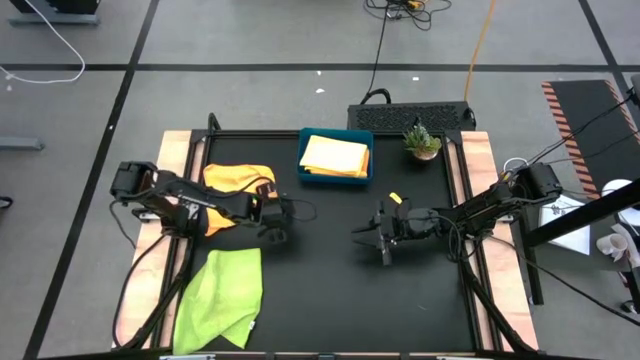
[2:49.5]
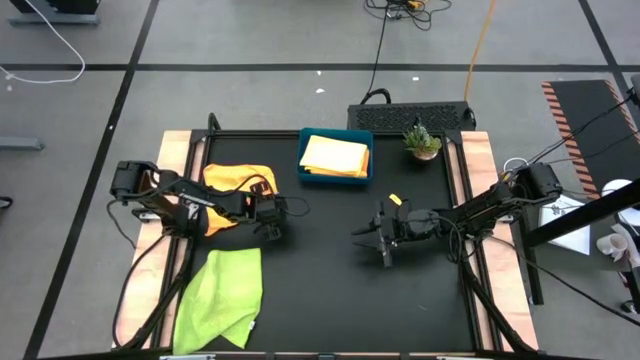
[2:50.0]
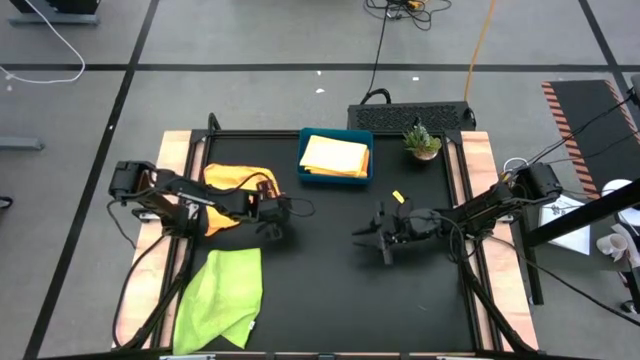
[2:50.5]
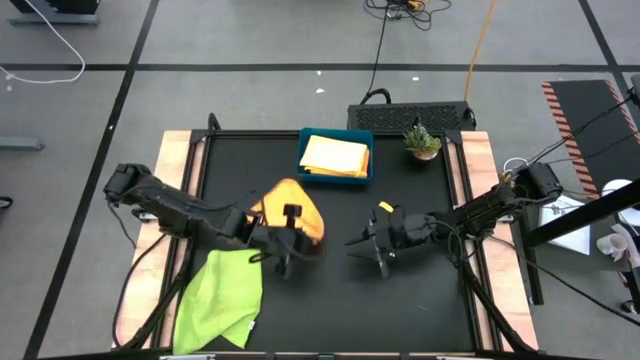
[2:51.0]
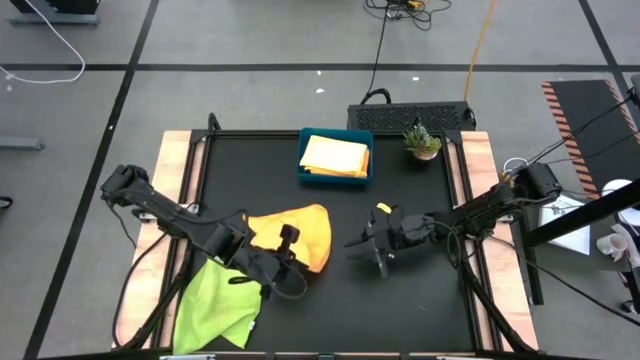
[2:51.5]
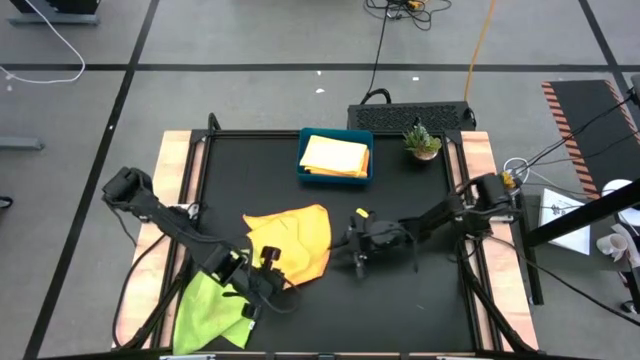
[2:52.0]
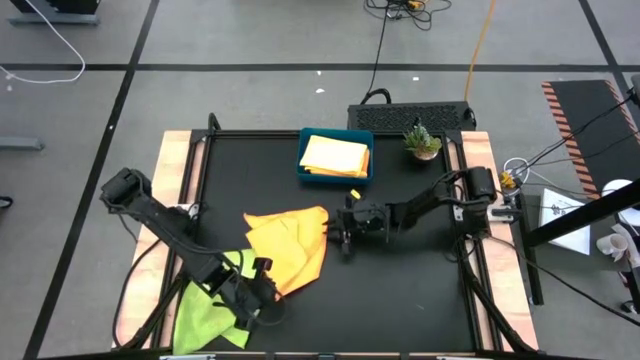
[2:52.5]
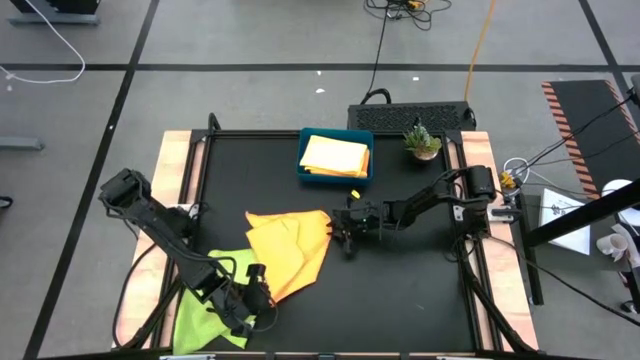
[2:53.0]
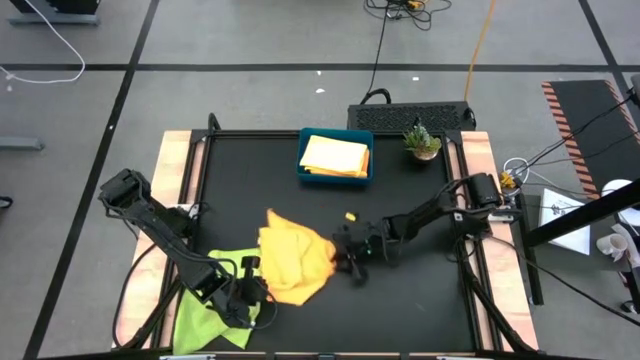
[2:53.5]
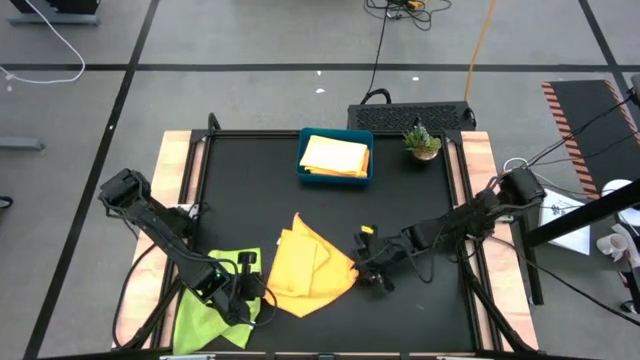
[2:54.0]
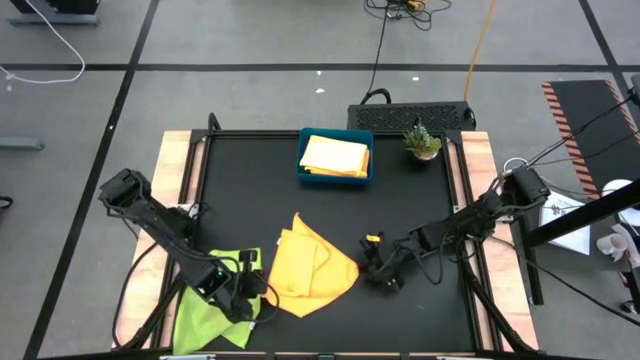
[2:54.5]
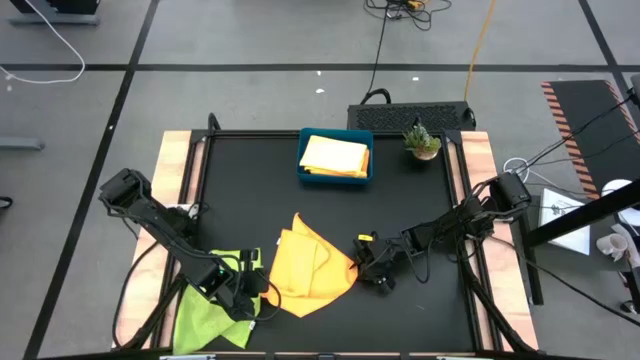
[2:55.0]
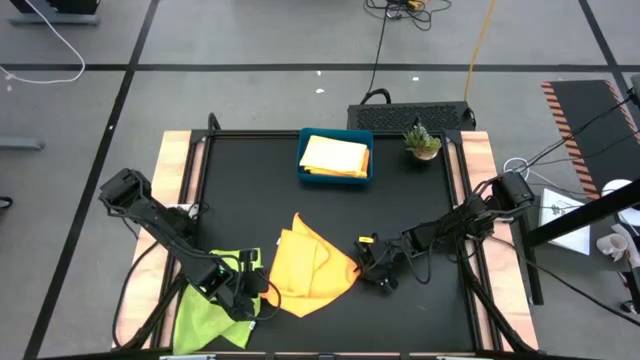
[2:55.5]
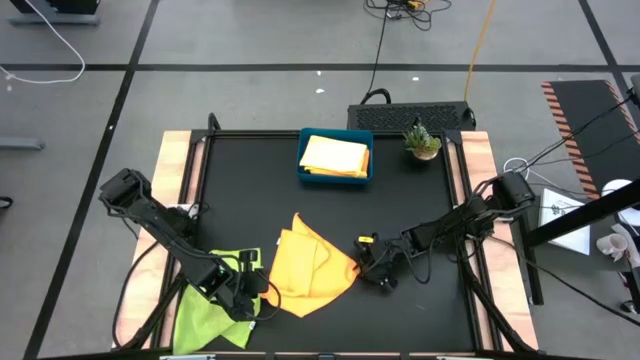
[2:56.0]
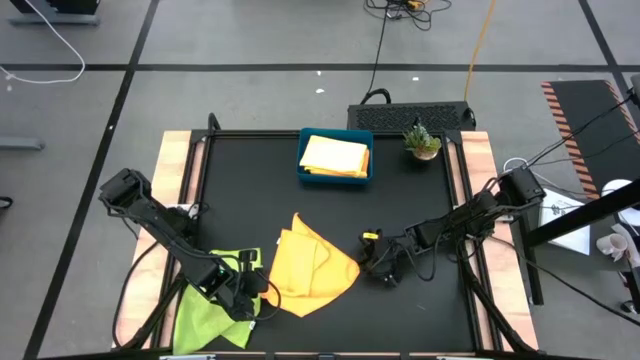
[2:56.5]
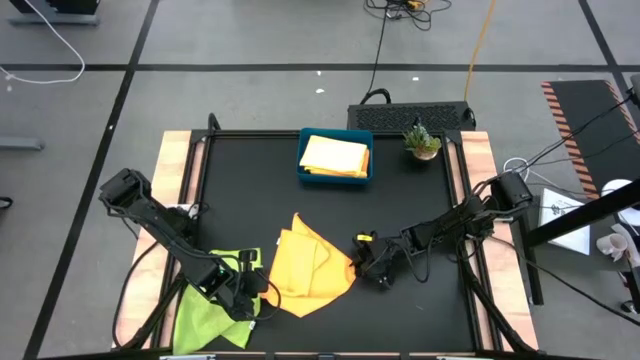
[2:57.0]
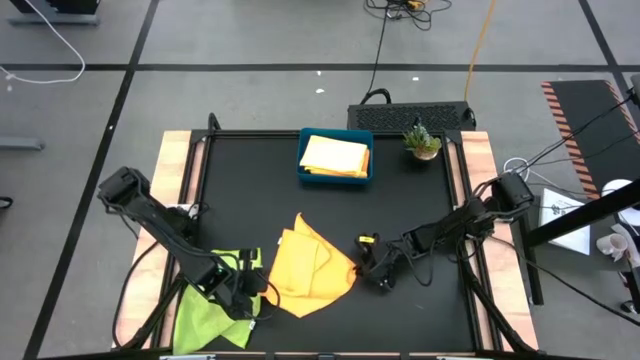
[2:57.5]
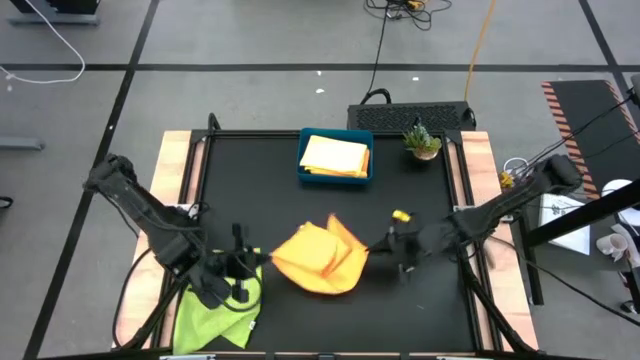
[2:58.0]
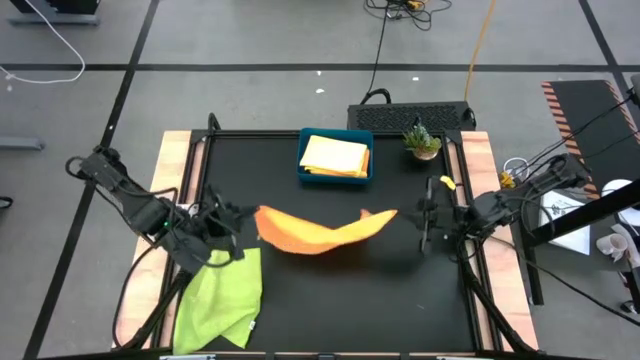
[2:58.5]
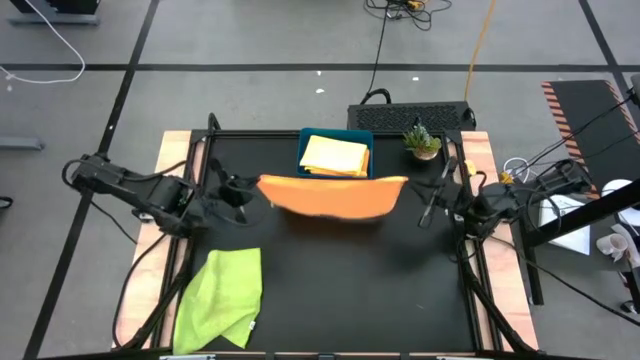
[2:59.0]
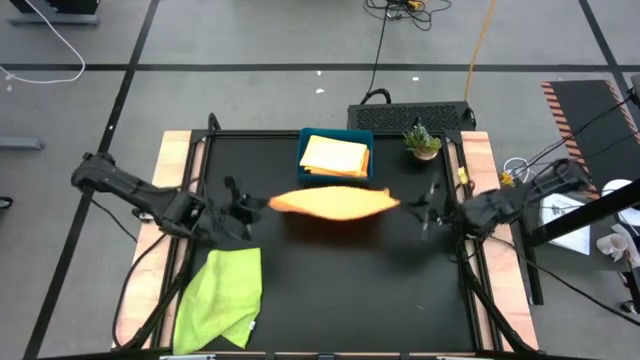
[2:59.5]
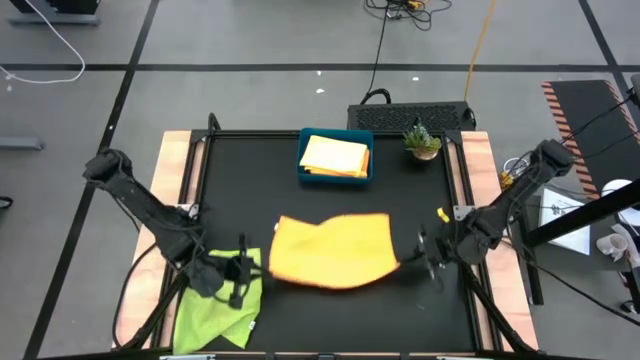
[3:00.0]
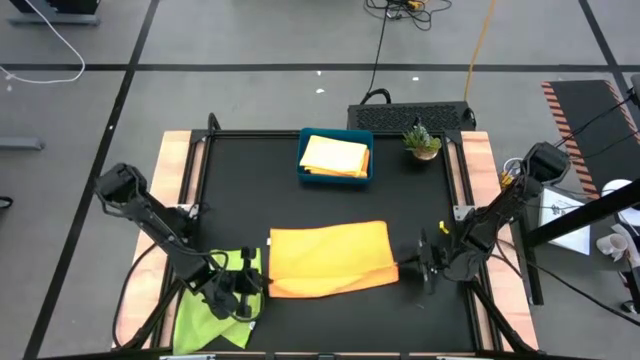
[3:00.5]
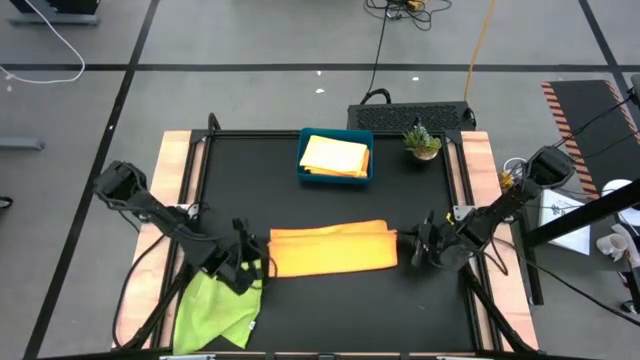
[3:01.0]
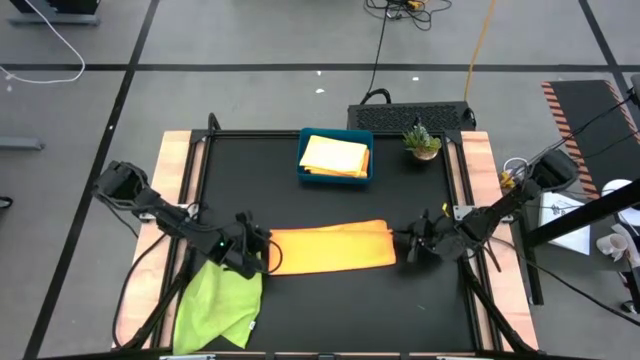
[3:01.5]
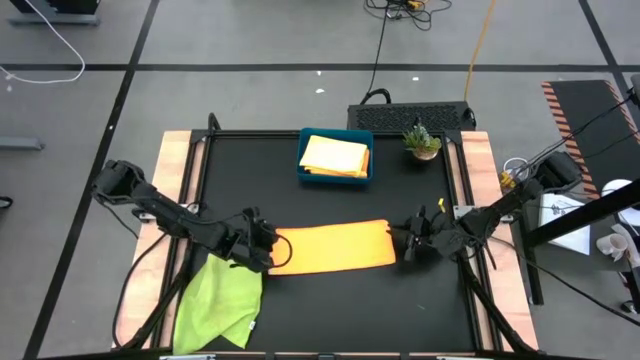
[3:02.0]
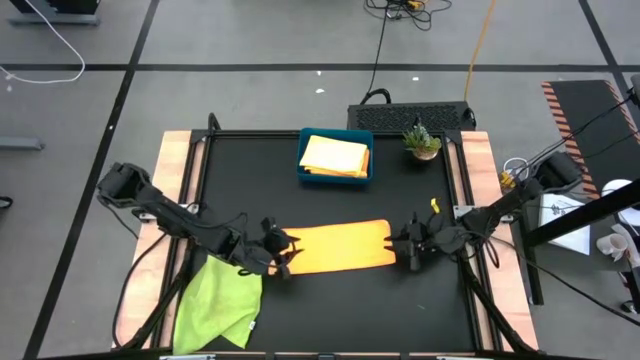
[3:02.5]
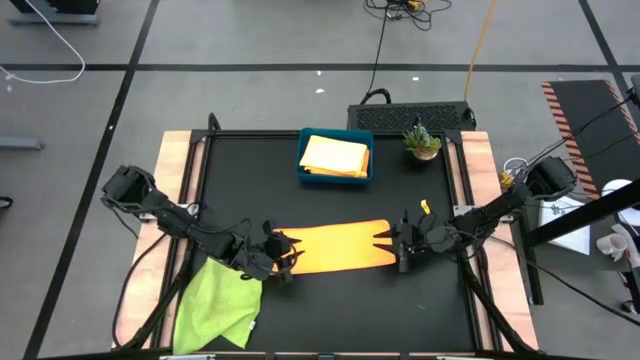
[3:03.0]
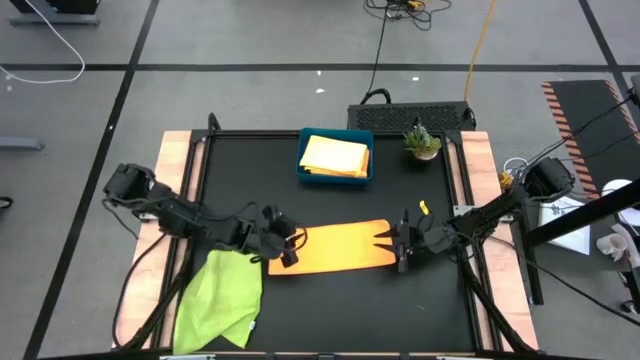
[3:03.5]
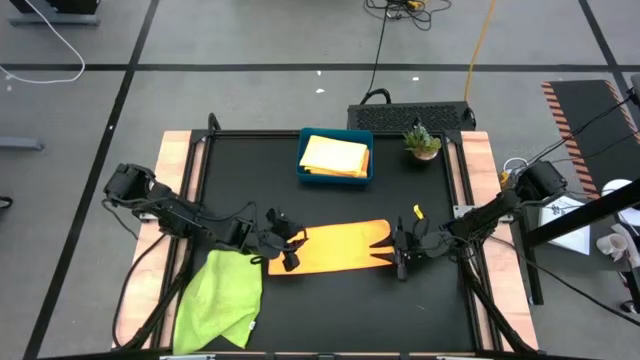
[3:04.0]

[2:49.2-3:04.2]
Task: Fold microfiber towels
Fold the orange microfiber cloth

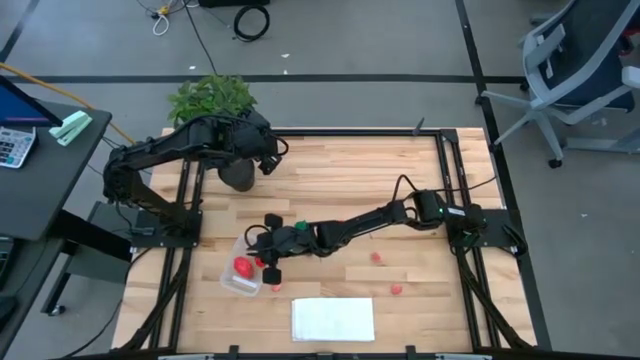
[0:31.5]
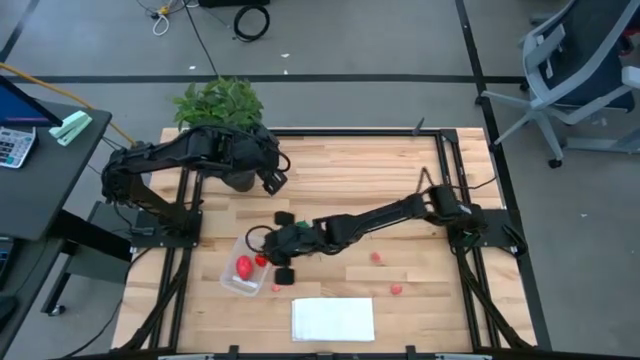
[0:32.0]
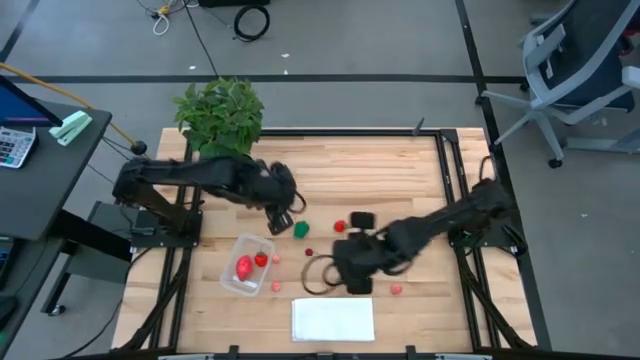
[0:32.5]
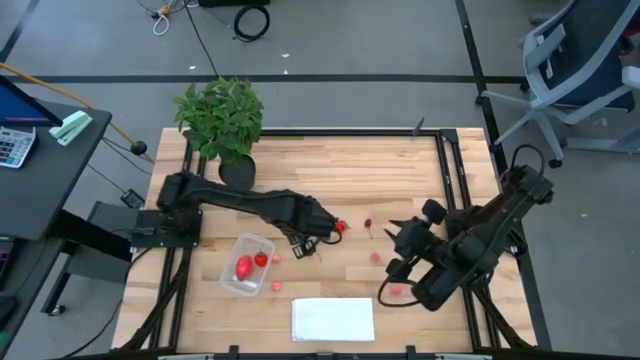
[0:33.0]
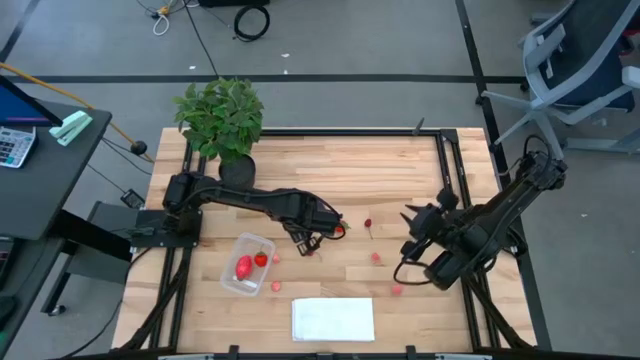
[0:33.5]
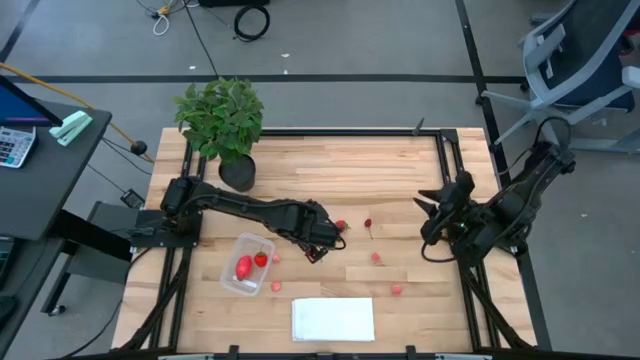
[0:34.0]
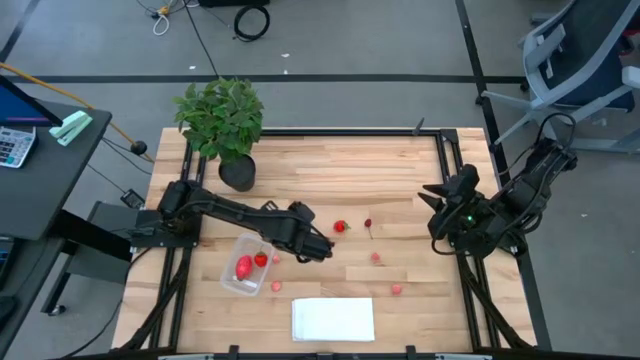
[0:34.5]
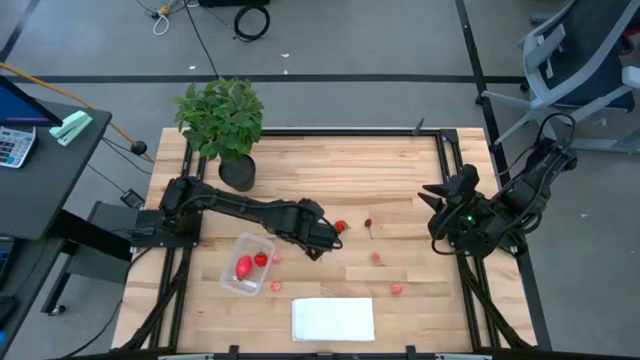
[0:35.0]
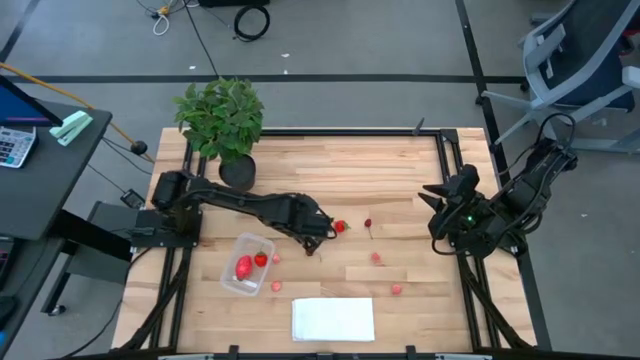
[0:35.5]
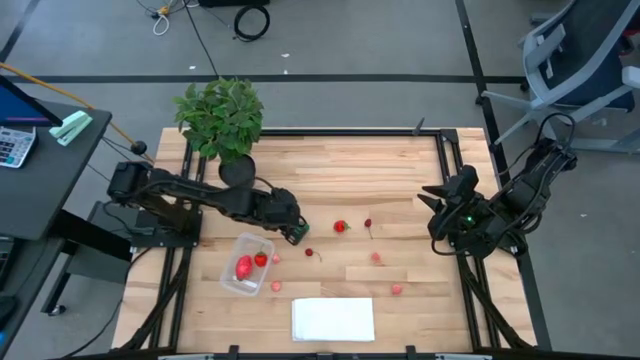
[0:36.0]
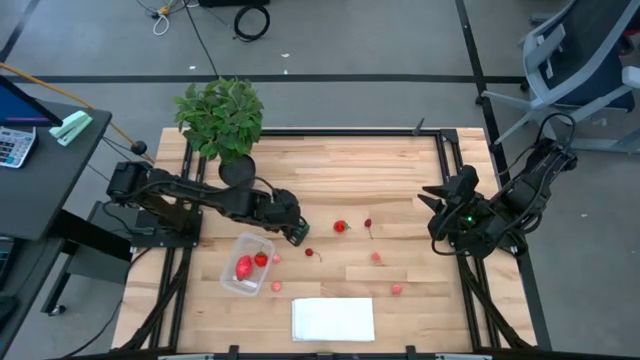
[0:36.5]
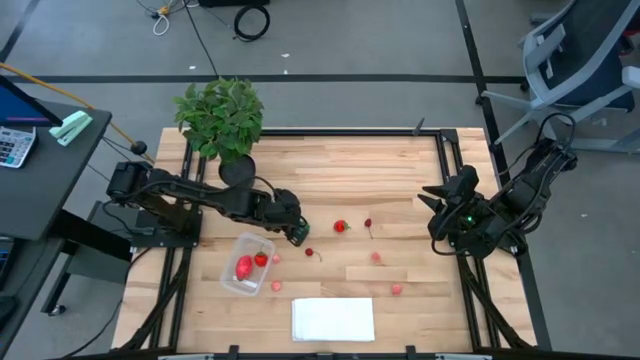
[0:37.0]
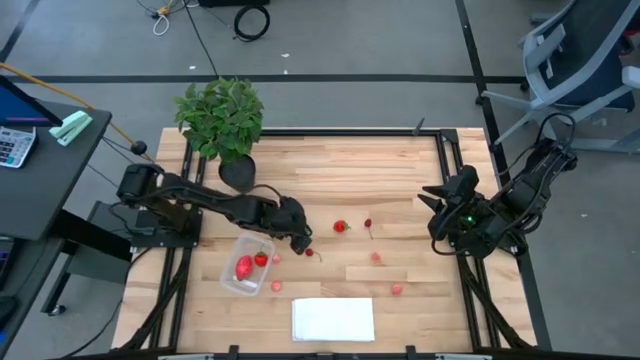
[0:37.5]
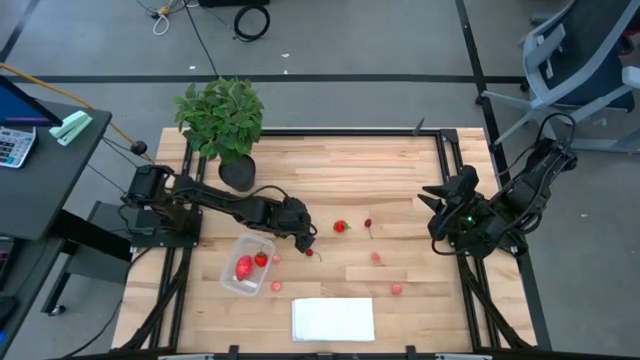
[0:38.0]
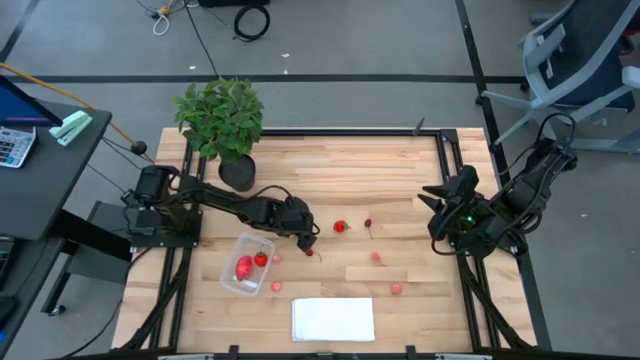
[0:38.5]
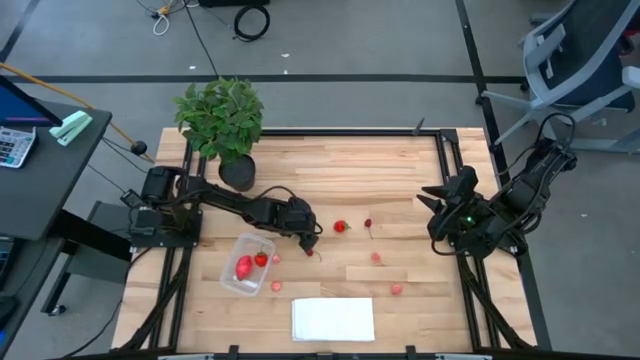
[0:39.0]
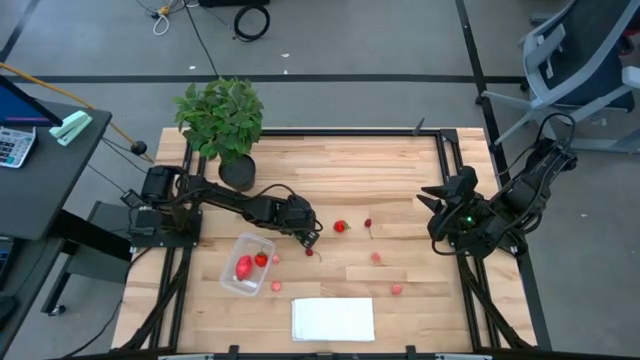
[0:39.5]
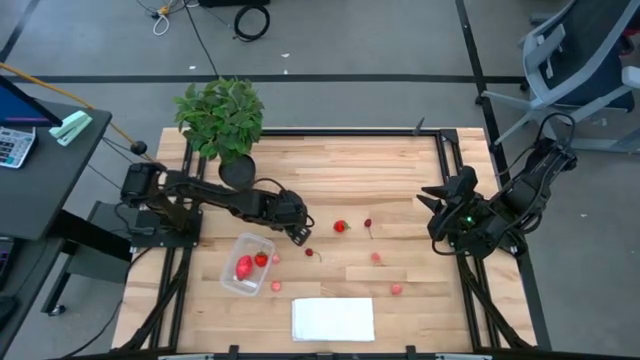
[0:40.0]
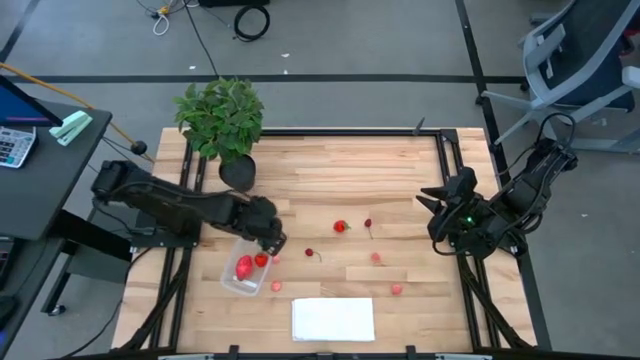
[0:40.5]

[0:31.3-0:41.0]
Task: Pick and placing Produce into tupperware
Put the green bell pepper into the transparent bin
